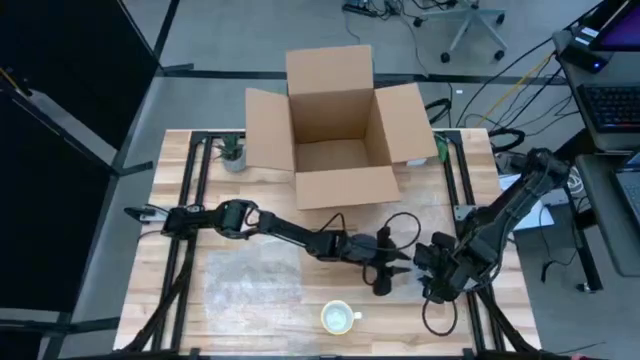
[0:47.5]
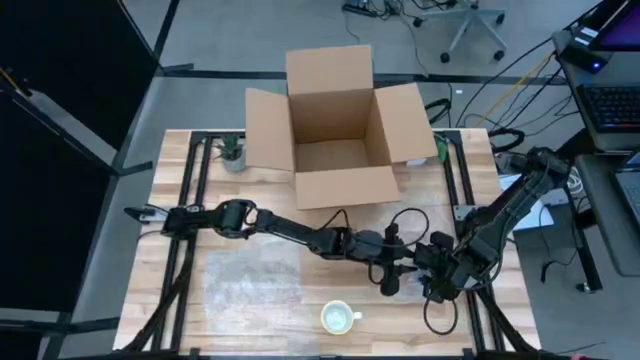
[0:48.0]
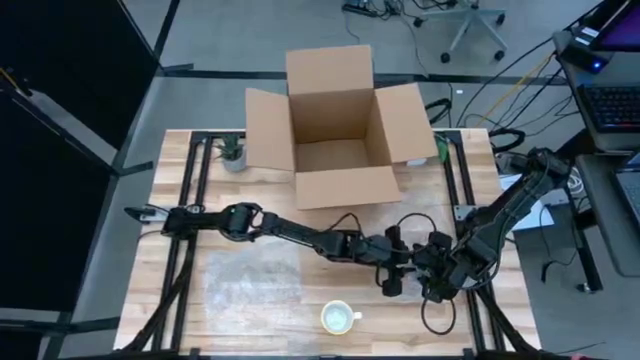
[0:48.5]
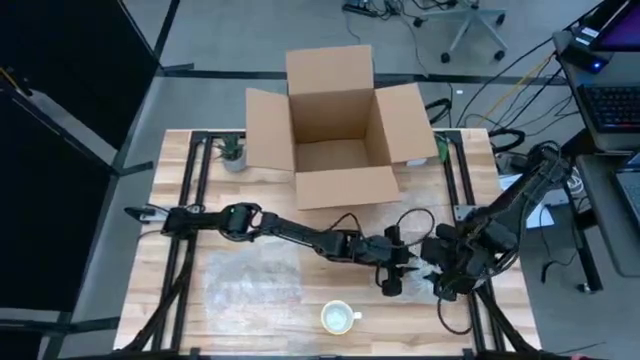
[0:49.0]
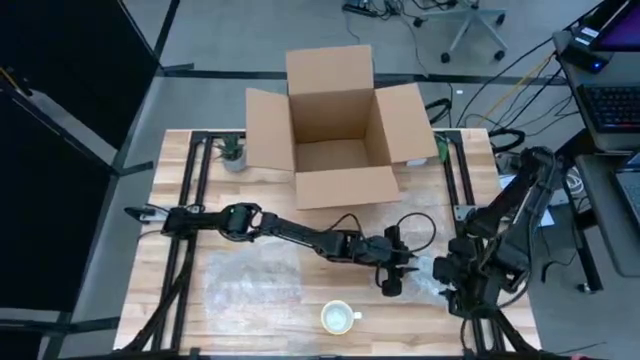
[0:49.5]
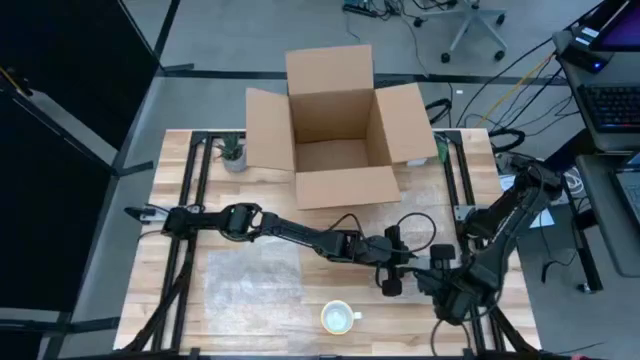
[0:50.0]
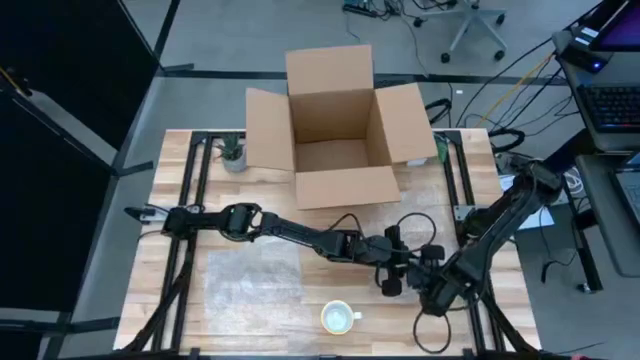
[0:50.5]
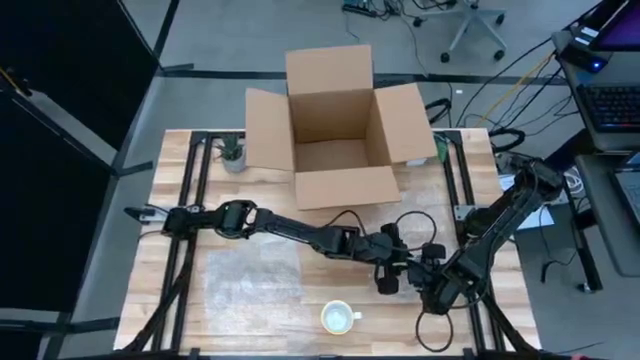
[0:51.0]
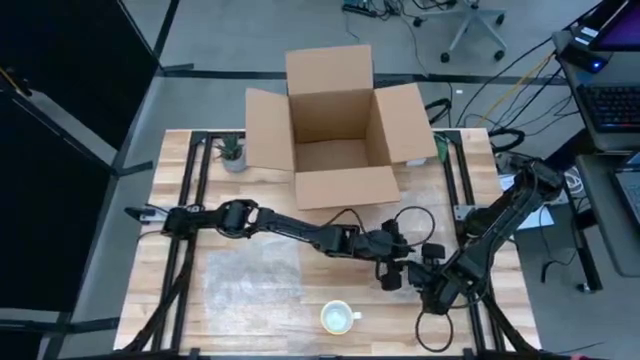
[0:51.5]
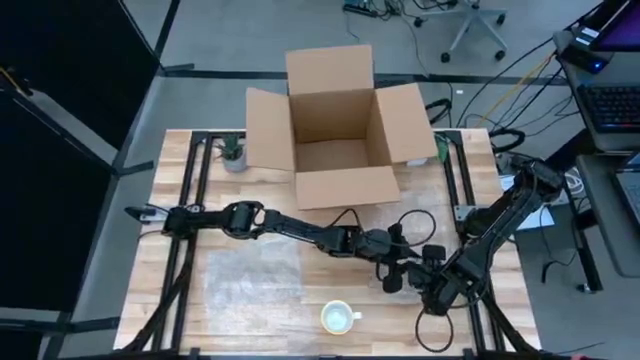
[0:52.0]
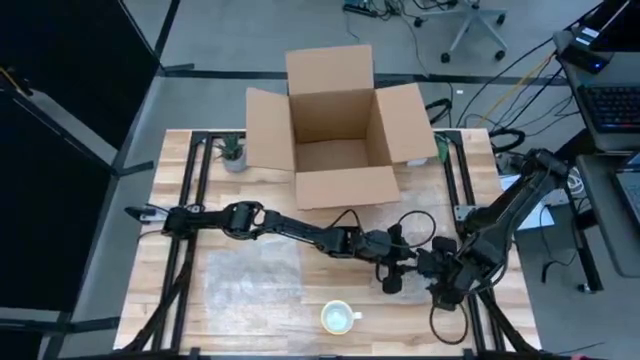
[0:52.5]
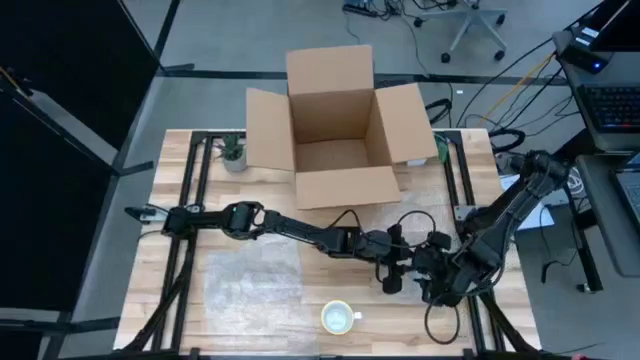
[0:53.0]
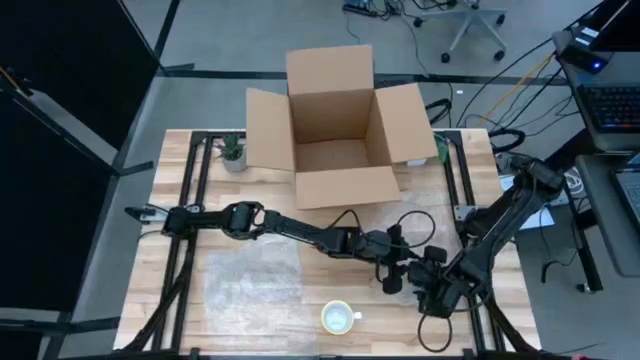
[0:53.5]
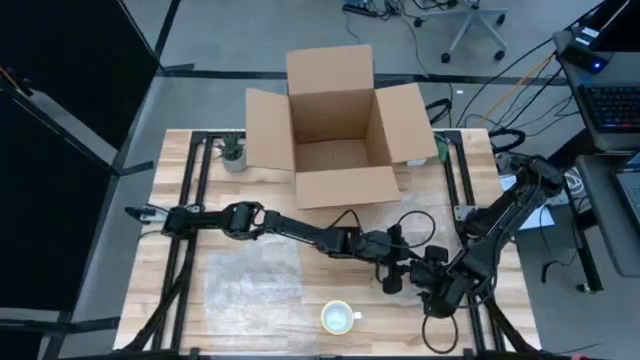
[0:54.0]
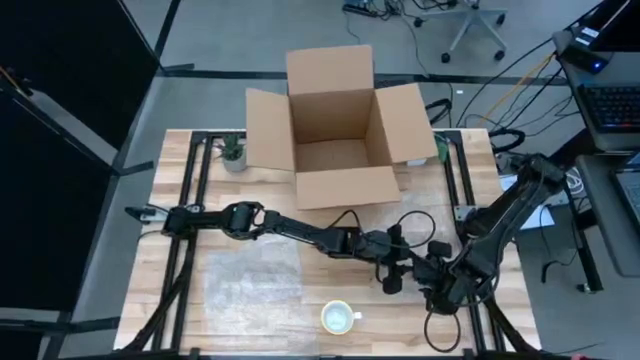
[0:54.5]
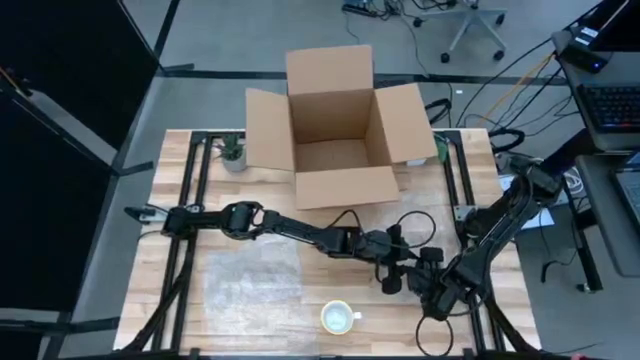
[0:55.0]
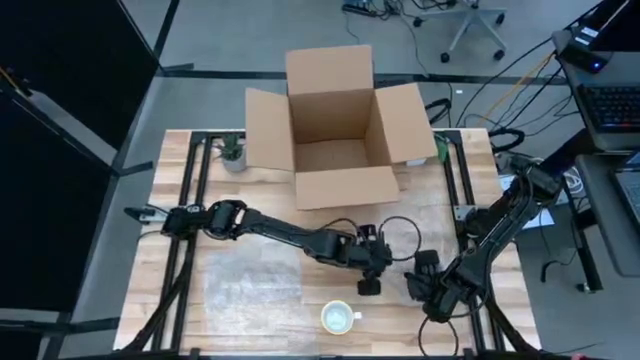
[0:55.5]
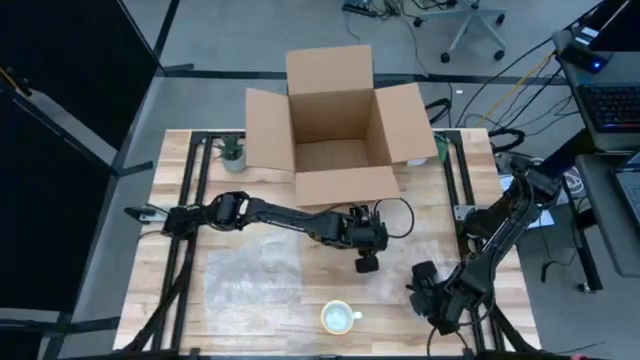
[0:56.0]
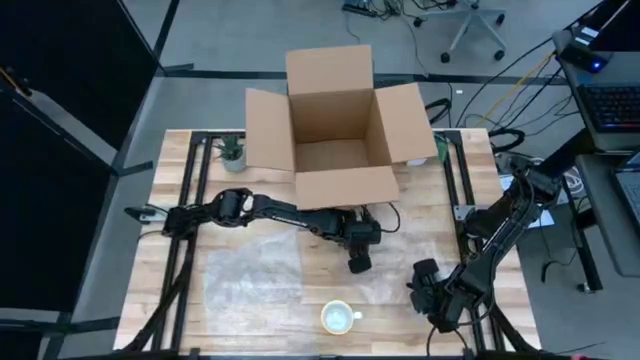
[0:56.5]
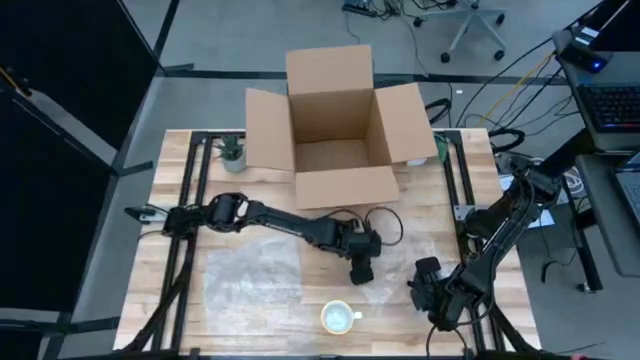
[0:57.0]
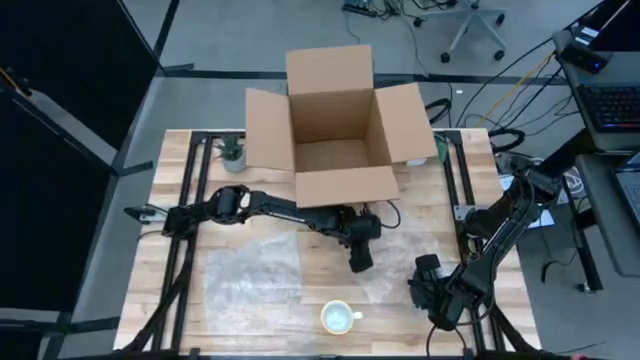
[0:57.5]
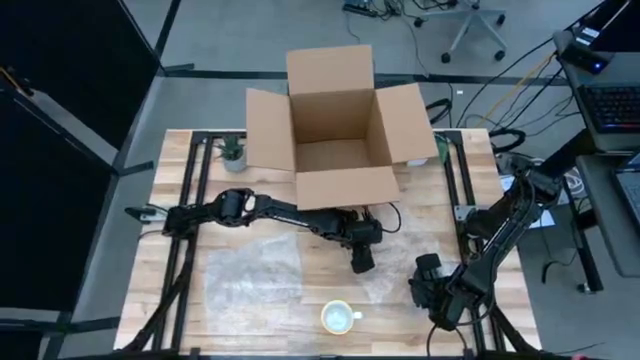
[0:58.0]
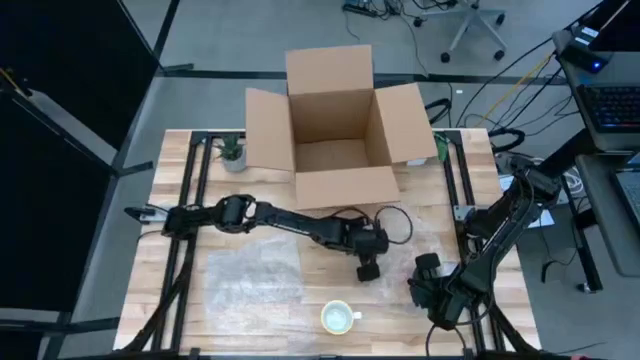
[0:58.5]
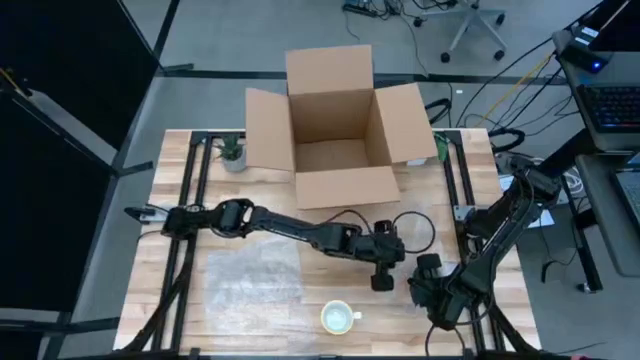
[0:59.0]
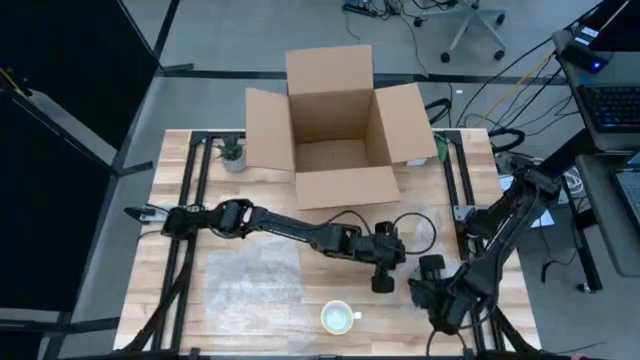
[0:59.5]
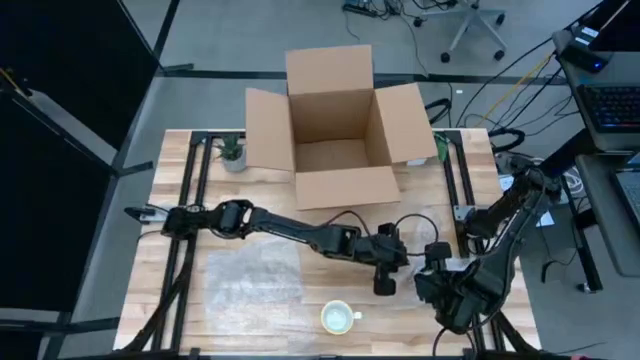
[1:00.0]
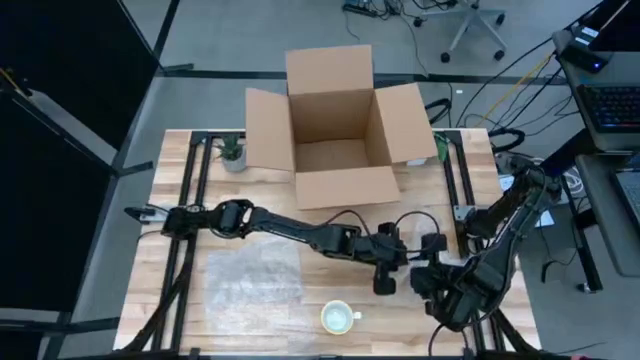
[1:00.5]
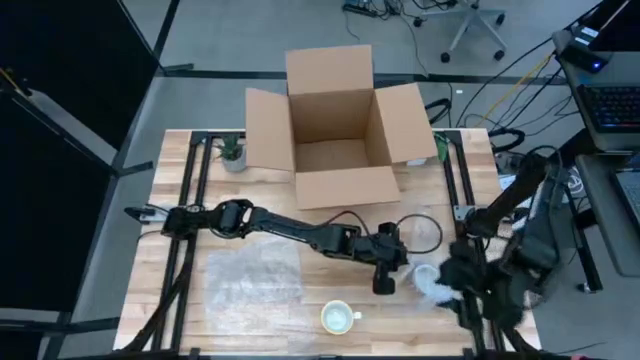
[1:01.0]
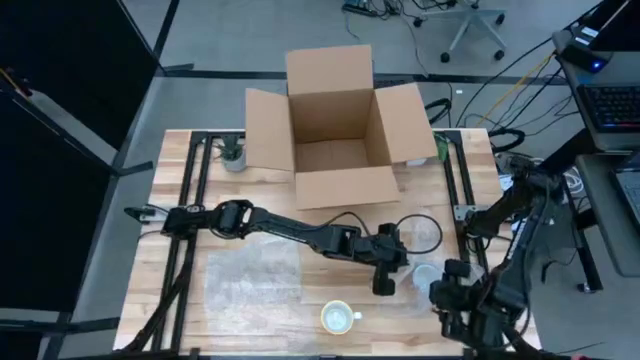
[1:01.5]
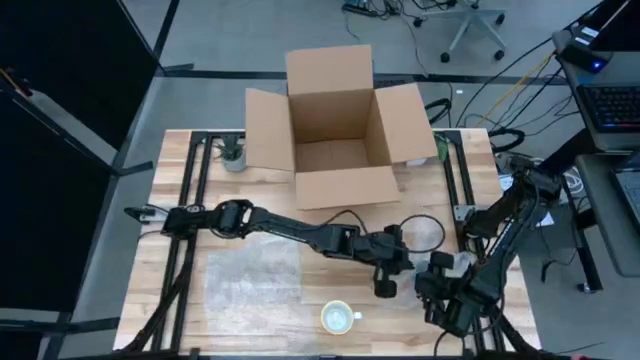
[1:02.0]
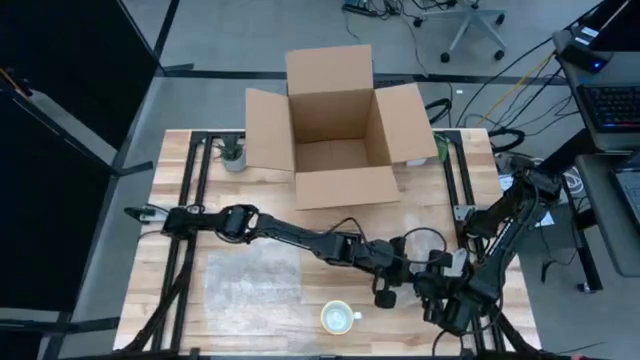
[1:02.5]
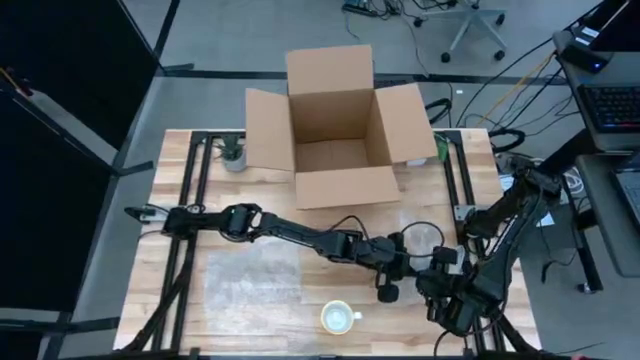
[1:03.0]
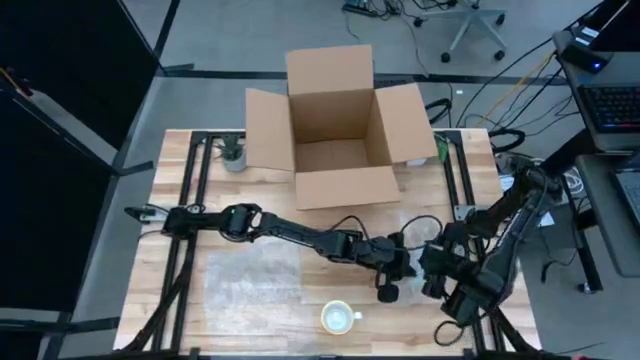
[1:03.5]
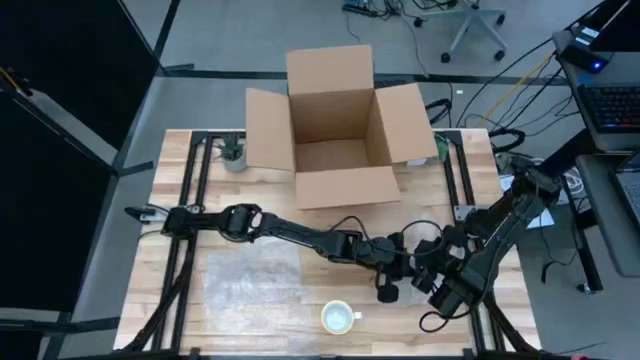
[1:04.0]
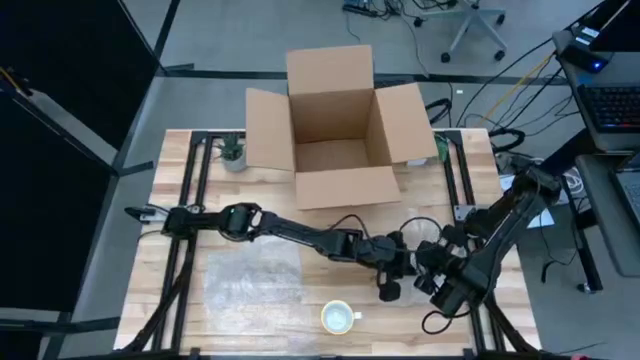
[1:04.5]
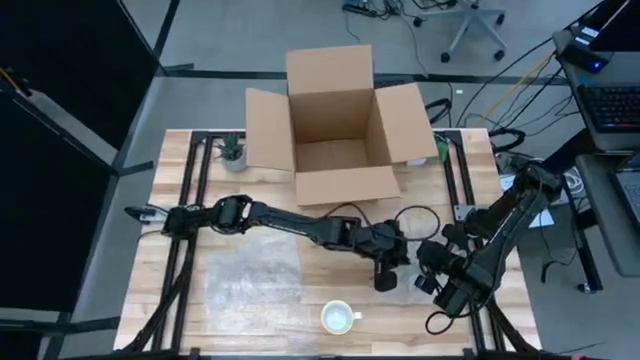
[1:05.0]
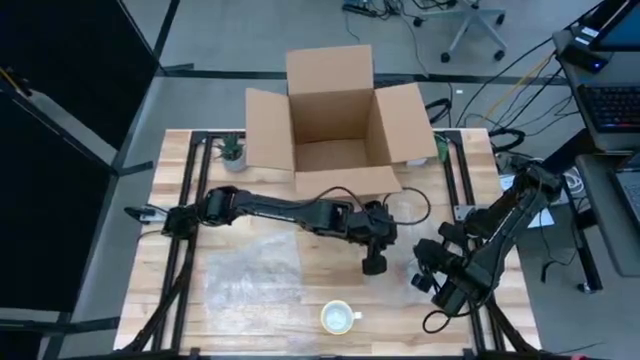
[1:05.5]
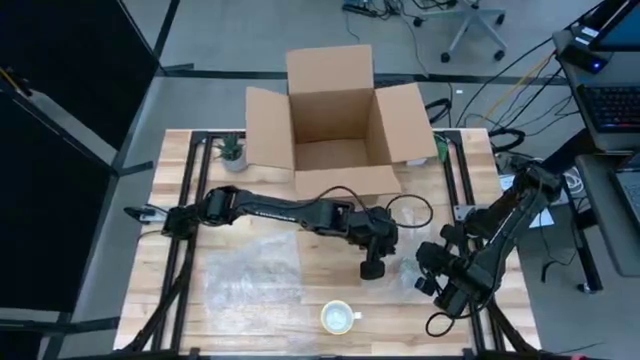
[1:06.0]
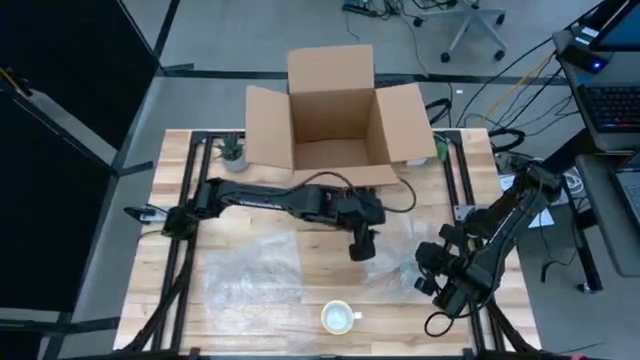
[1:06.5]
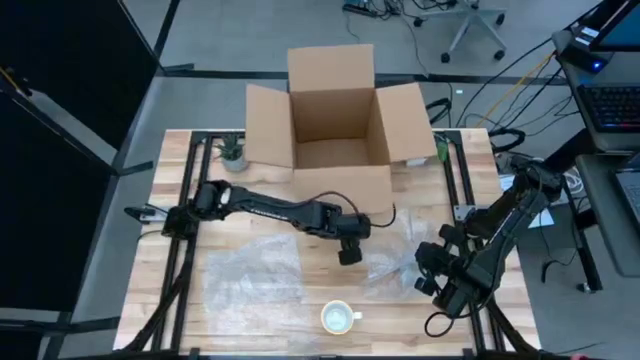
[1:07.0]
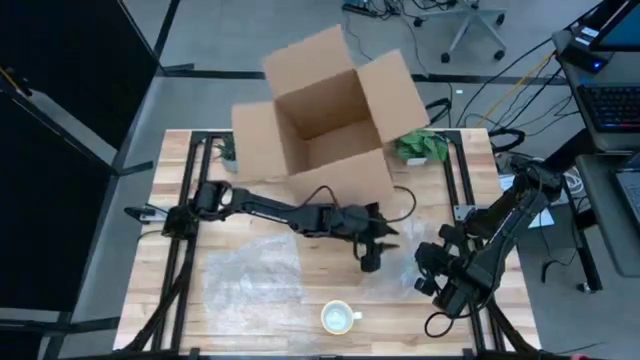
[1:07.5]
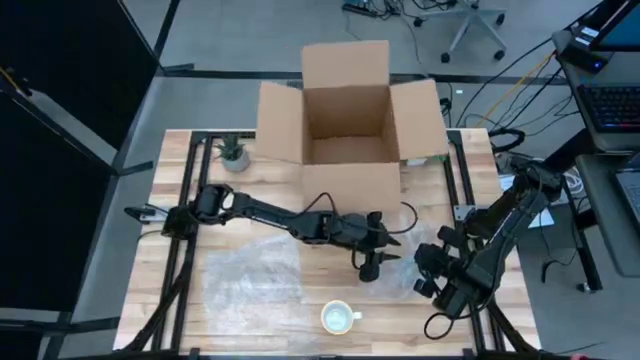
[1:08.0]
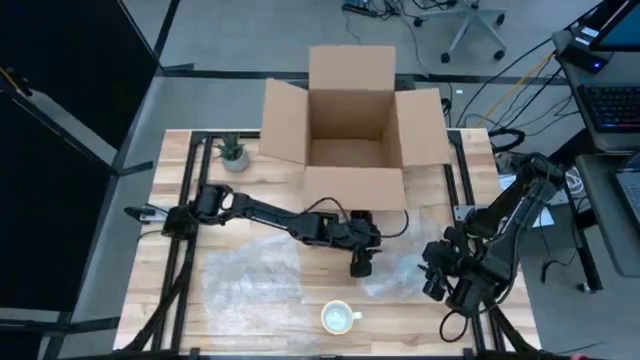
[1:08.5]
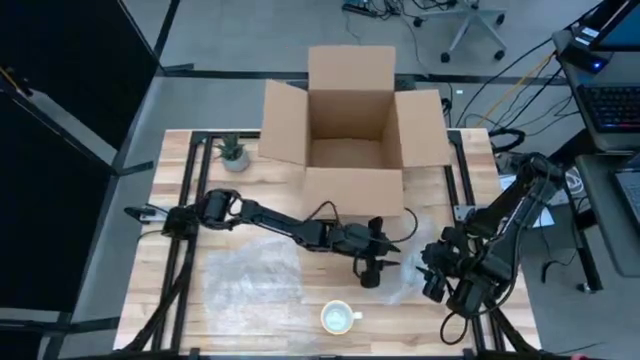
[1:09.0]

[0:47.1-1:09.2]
Task: wrap mug
Wrap the red mug with bubble wrap
